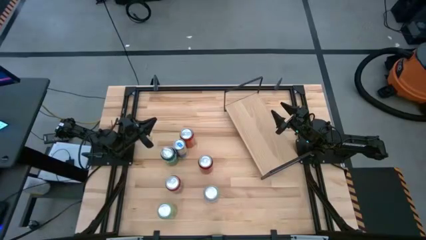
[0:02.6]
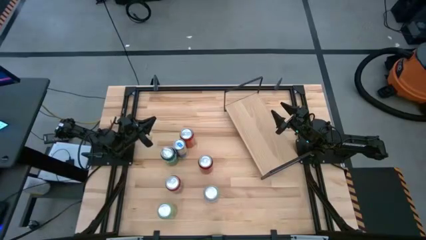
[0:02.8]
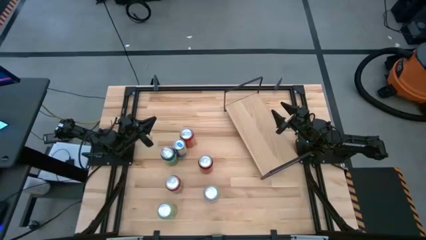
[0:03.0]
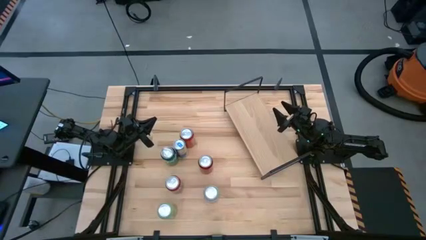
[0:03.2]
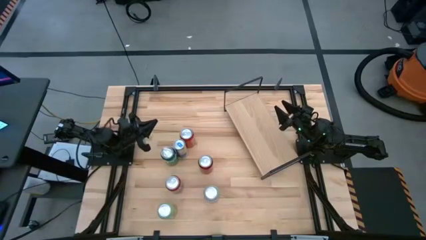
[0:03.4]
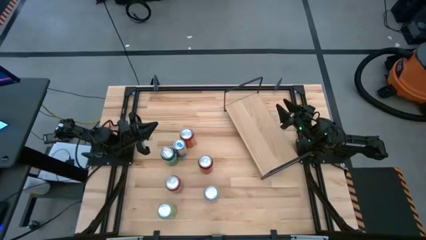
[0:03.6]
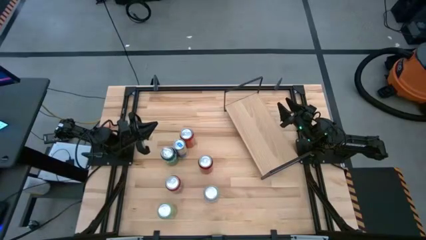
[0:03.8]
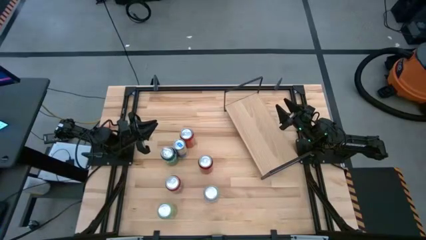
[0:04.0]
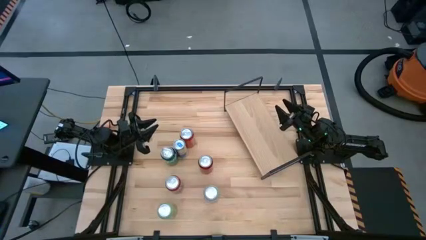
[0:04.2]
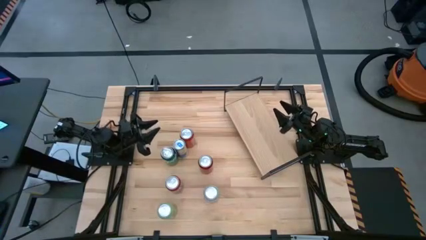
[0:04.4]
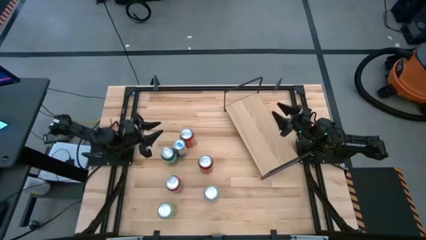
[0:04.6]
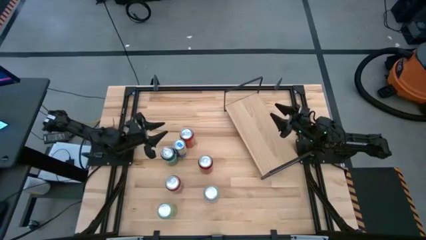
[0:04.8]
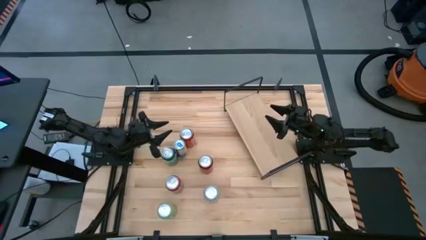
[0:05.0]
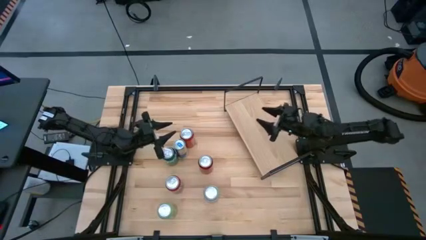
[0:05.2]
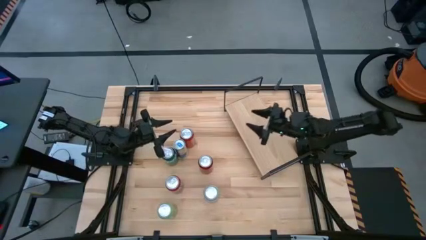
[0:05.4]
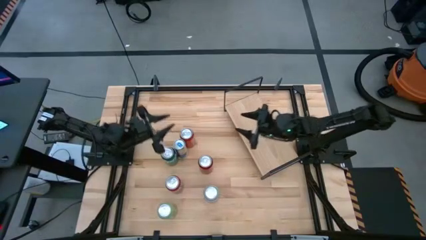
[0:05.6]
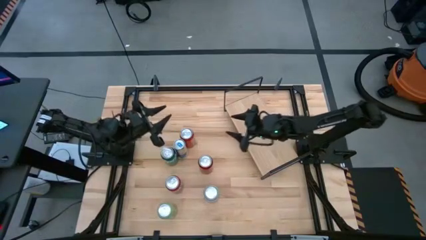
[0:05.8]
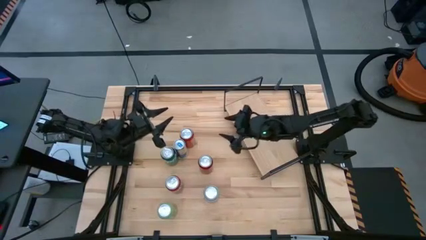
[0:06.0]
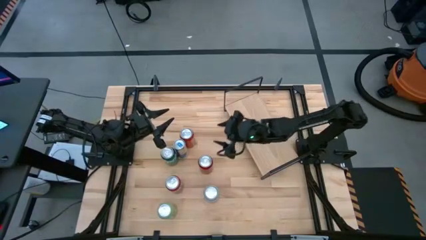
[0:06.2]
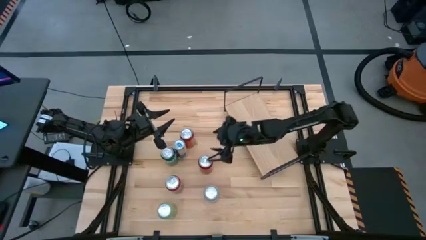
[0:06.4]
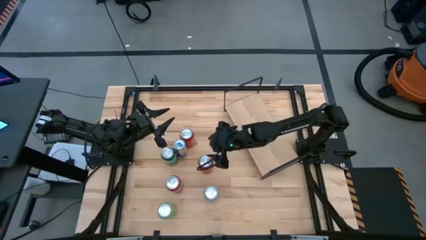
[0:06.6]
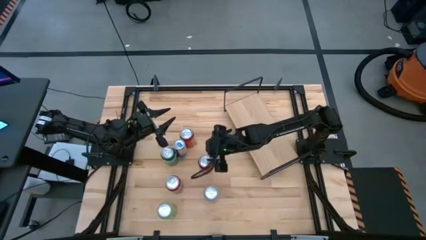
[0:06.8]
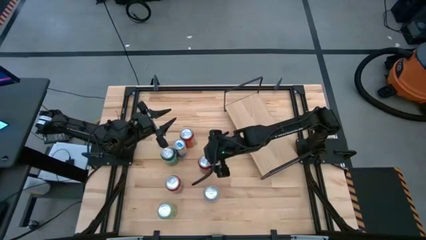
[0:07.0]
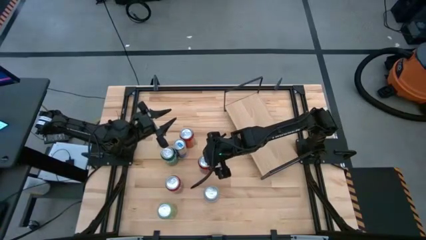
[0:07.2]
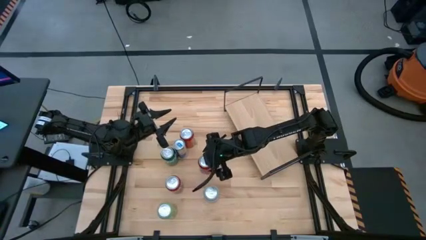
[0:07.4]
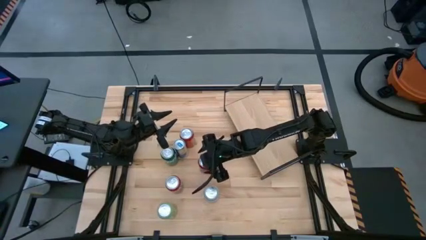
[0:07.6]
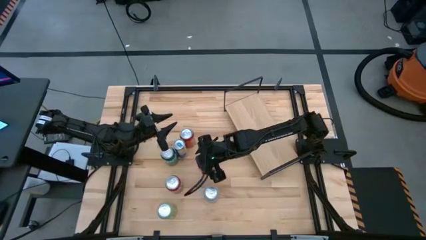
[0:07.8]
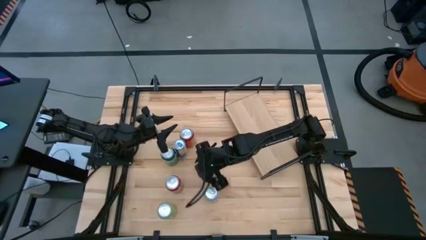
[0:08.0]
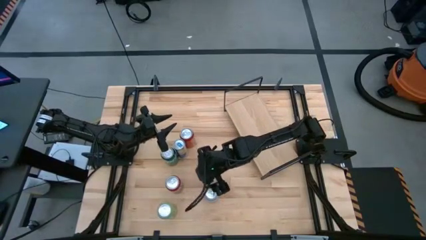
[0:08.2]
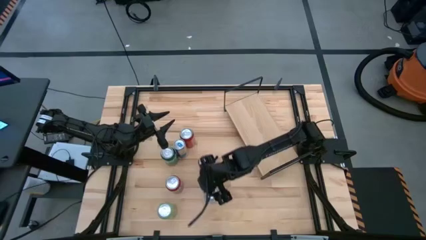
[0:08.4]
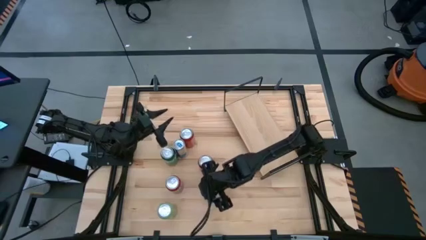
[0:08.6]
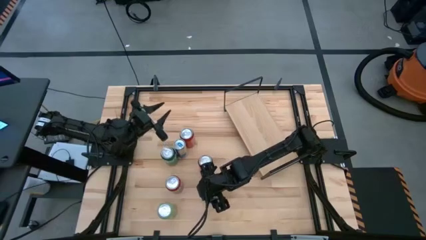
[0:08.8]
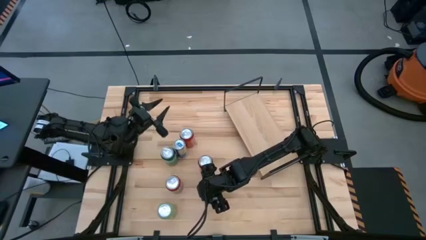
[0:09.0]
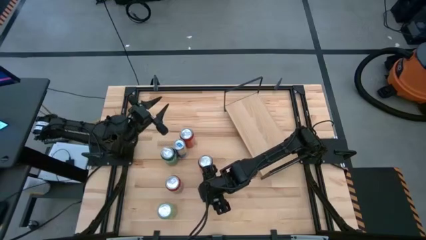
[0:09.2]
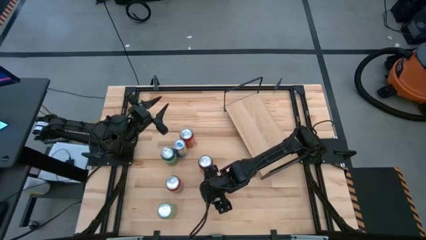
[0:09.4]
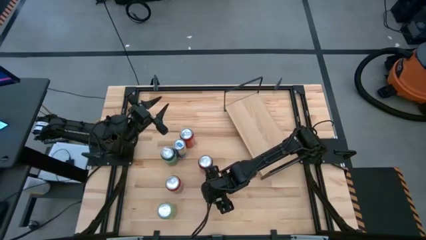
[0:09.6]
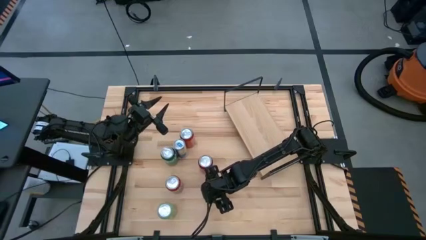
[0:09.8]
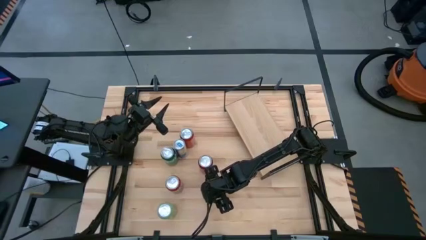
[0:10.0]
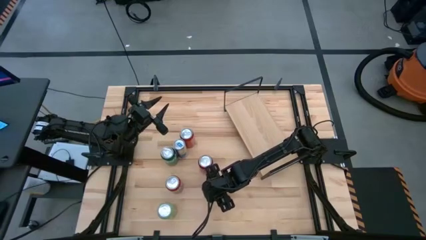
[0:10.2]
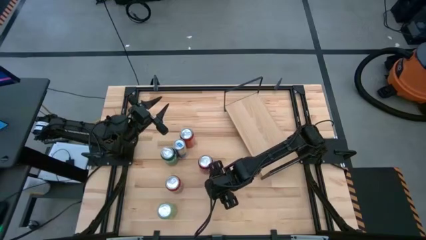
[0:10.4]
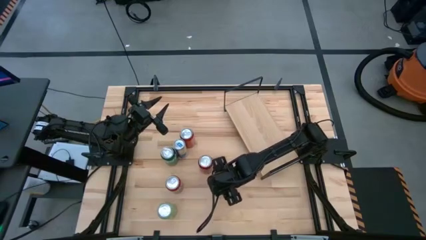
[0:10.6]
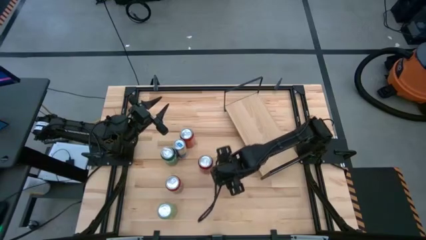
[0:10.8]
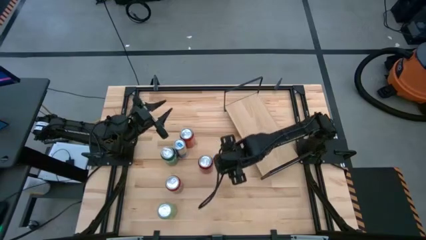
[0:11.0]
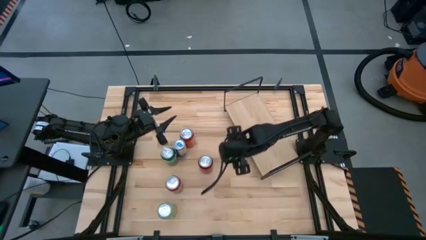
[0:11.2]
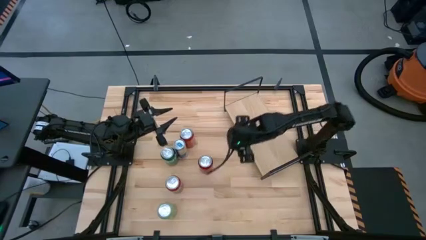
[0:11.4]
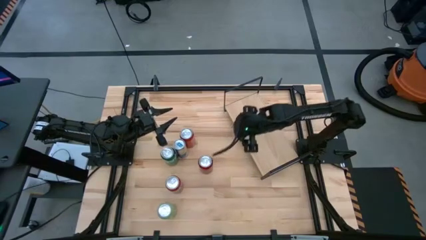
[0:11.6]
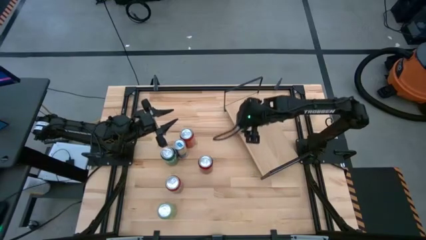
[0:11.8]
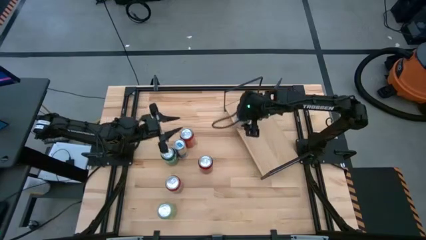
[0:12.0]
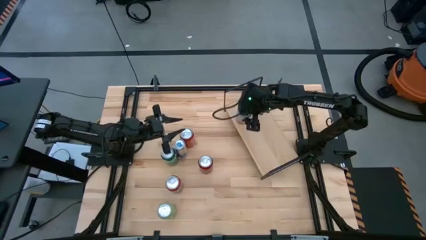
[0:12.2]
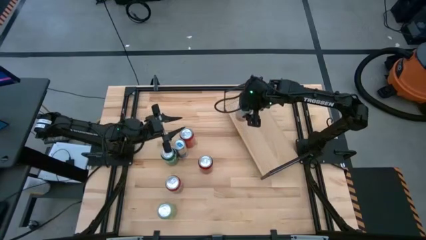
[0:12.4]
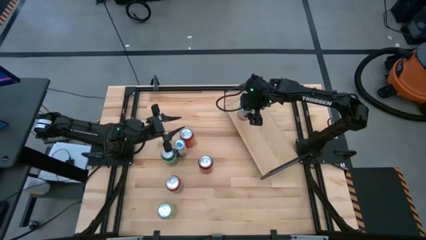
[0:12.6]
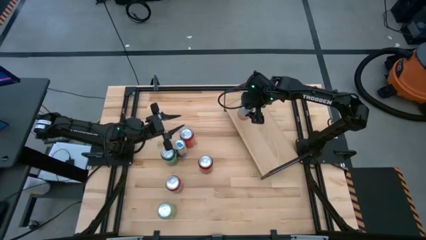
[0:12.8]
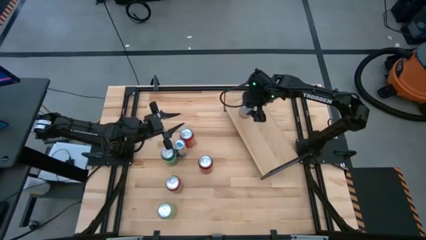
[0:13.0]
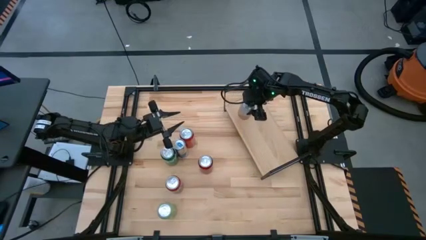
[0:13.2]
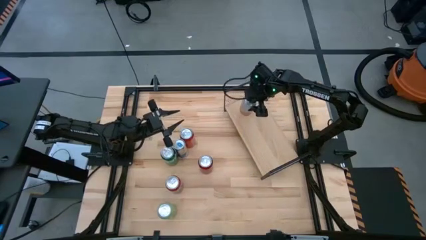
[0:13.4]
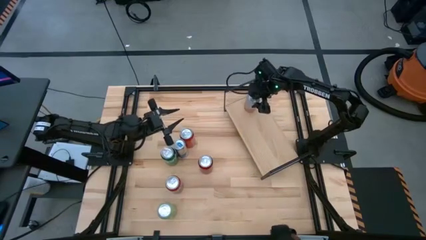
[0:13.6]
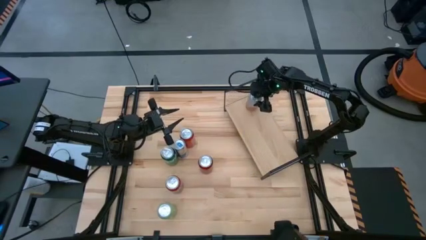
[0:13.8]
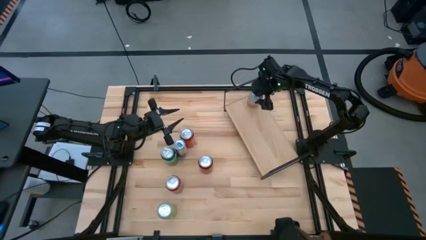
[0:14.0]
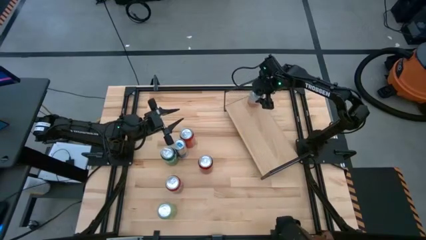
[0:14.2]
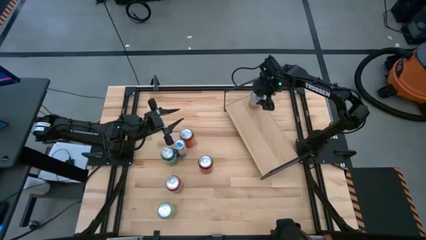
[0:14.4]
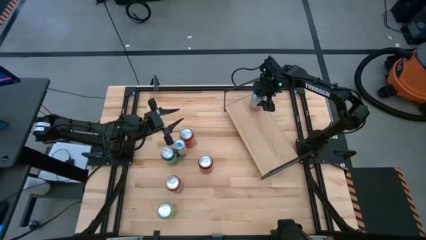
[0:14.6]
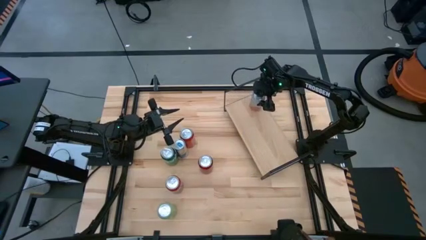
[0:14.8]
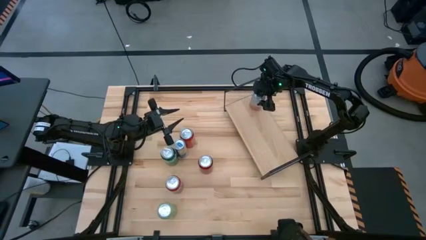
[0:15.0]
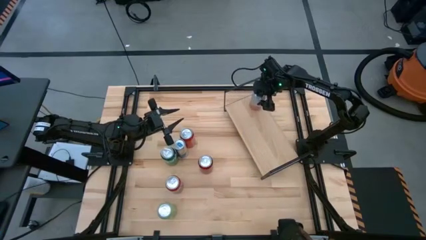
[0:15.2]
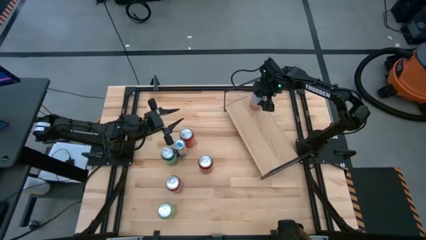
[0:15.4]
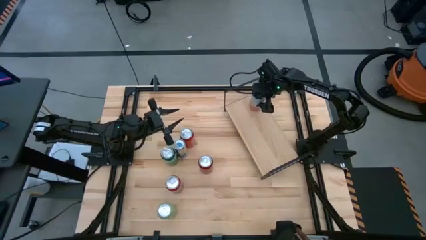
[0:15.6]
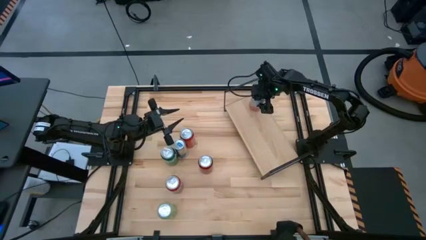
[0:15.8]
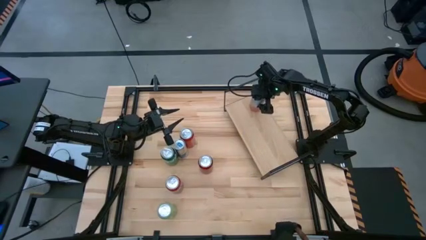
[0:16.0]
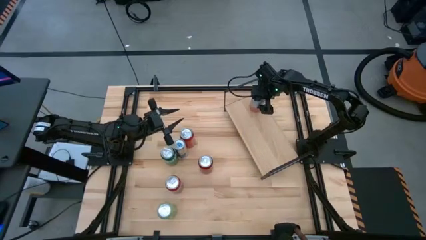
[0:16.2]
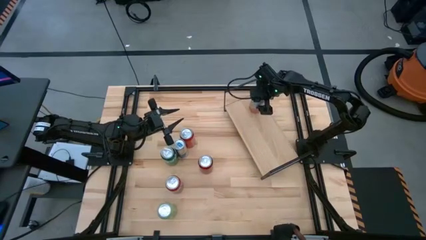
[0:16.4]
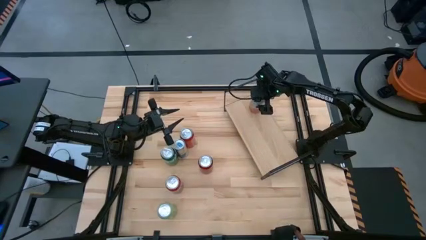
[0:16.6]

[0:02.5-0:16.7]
Task: Place canned beverage on shelf
Put the pink soda can on the shelf
